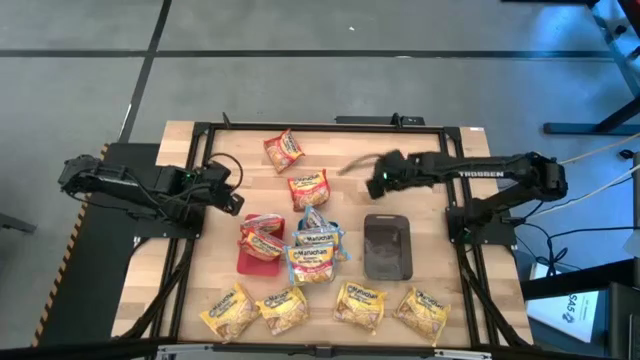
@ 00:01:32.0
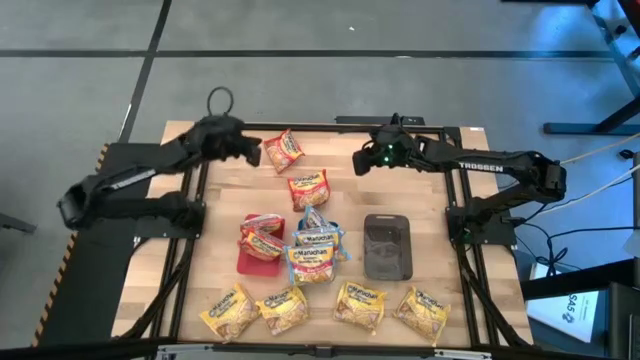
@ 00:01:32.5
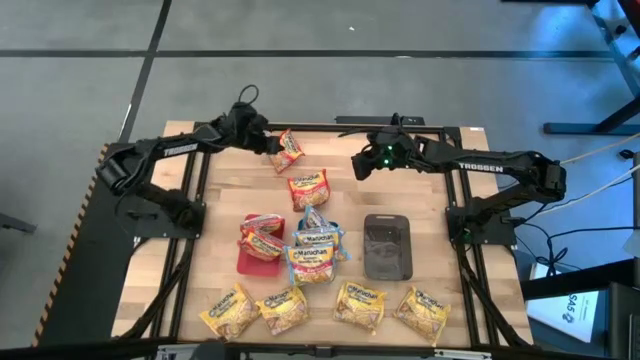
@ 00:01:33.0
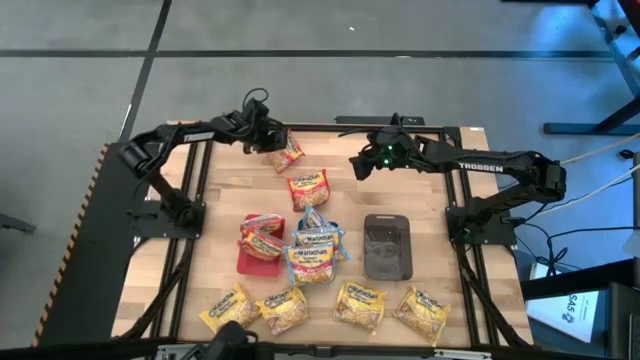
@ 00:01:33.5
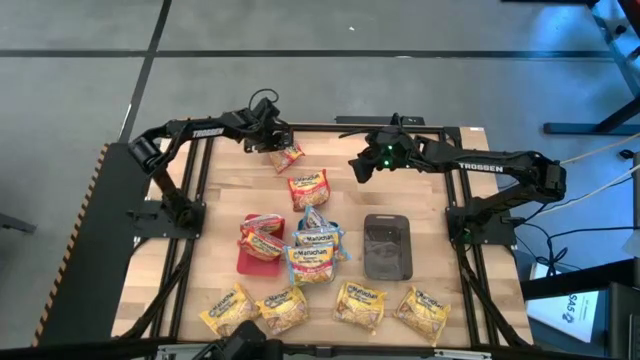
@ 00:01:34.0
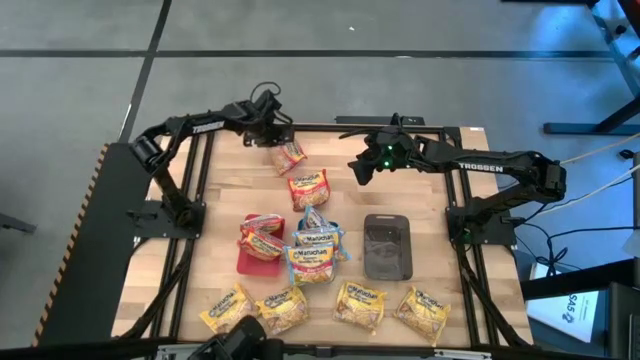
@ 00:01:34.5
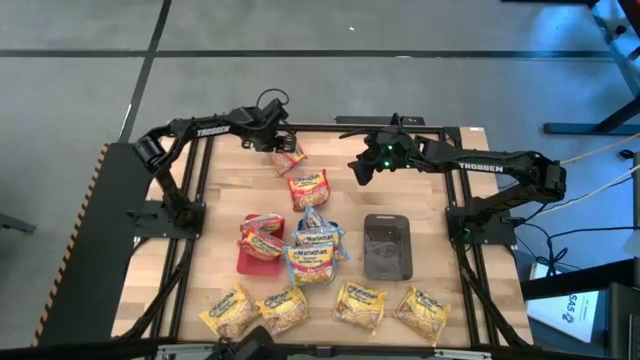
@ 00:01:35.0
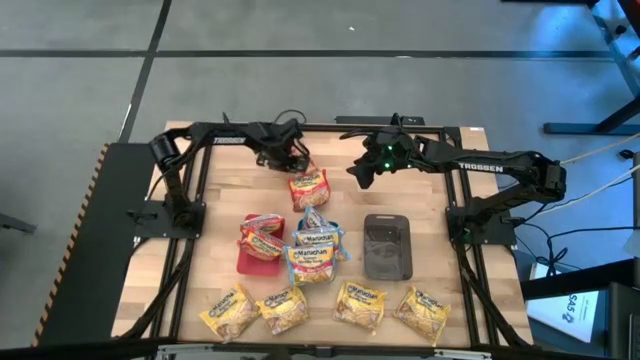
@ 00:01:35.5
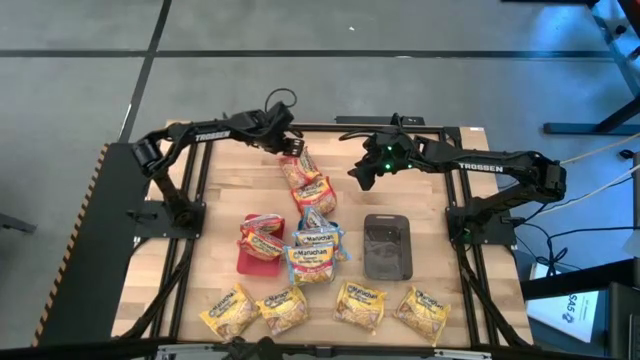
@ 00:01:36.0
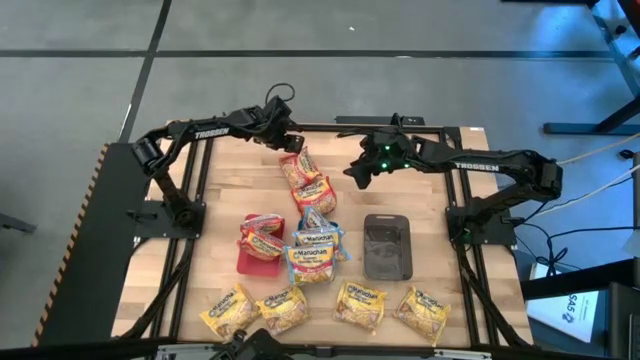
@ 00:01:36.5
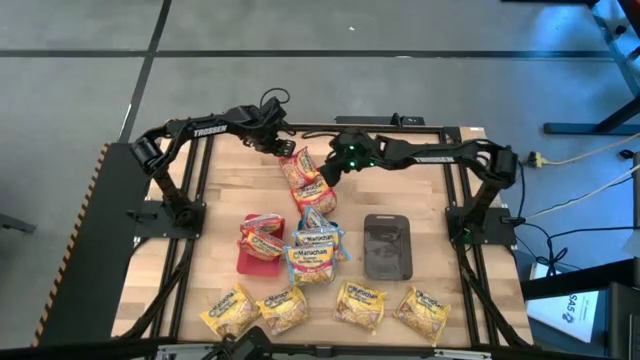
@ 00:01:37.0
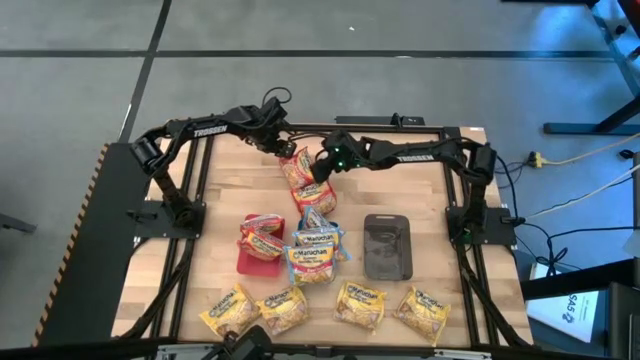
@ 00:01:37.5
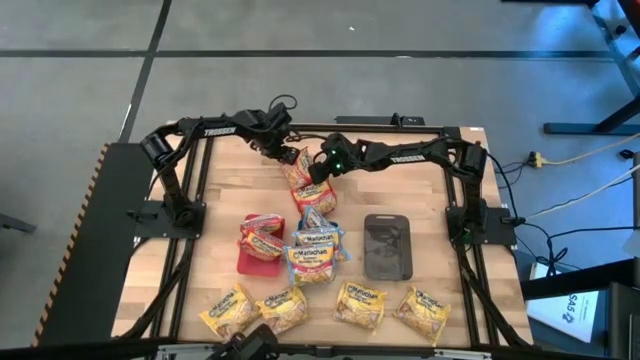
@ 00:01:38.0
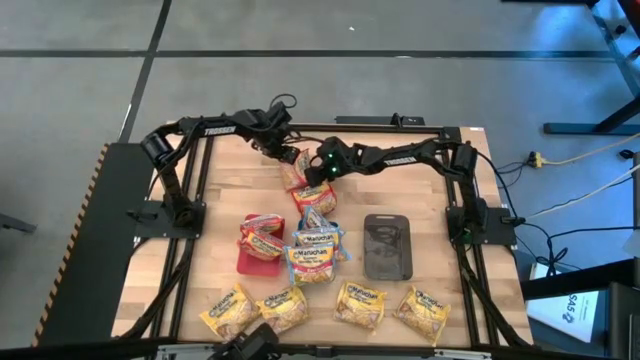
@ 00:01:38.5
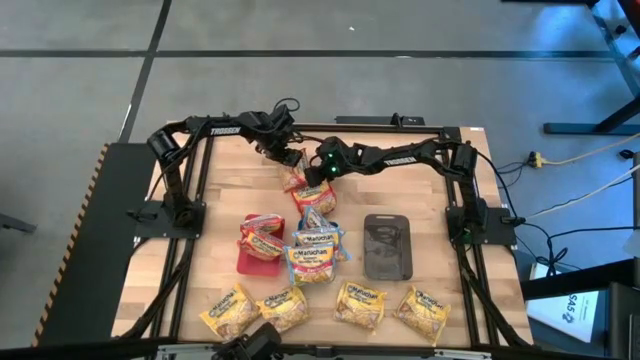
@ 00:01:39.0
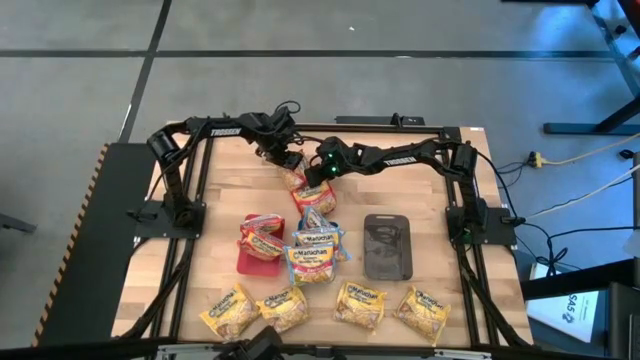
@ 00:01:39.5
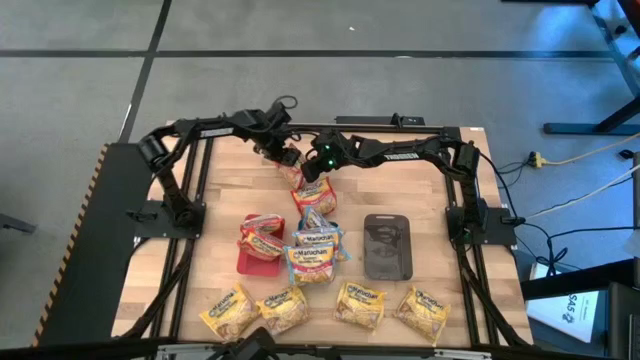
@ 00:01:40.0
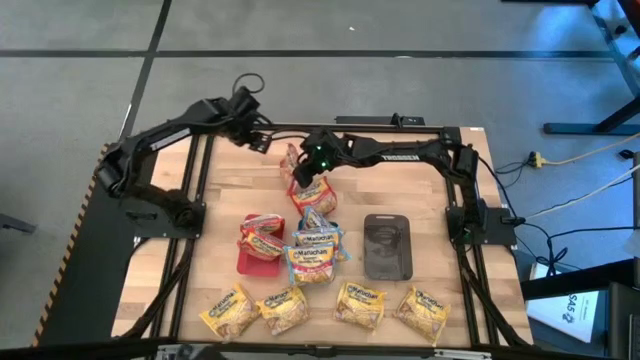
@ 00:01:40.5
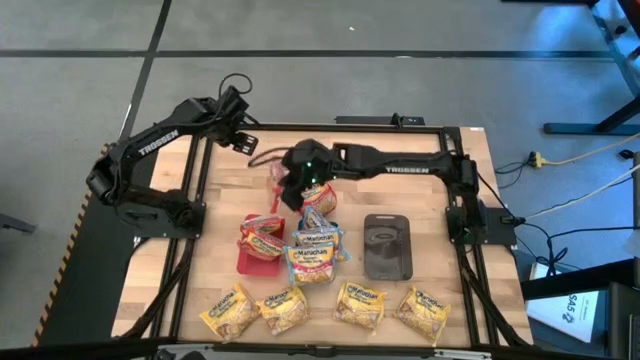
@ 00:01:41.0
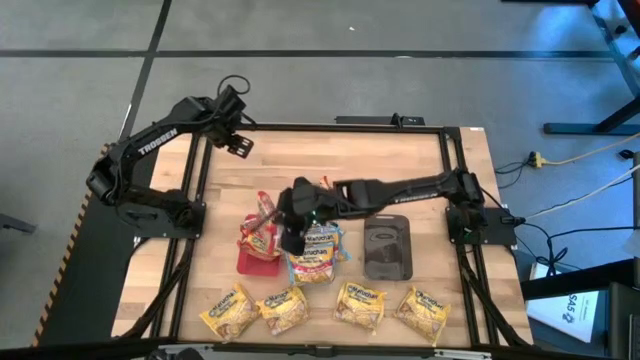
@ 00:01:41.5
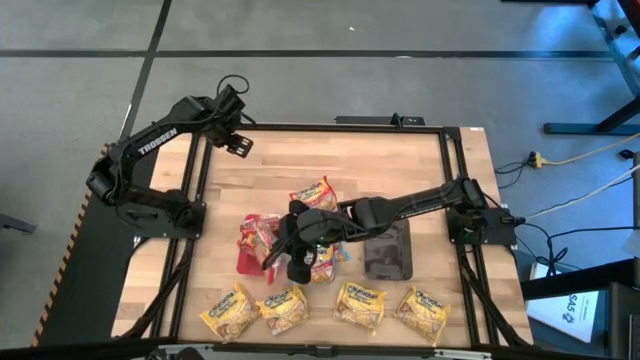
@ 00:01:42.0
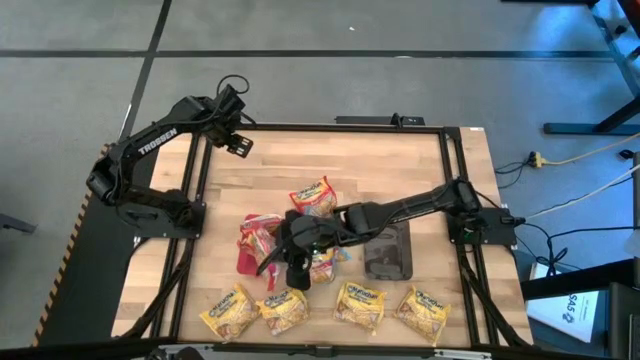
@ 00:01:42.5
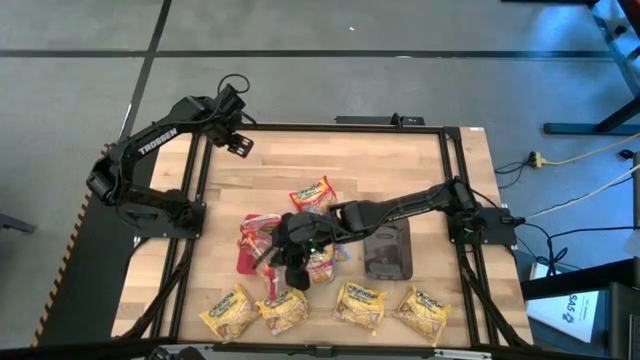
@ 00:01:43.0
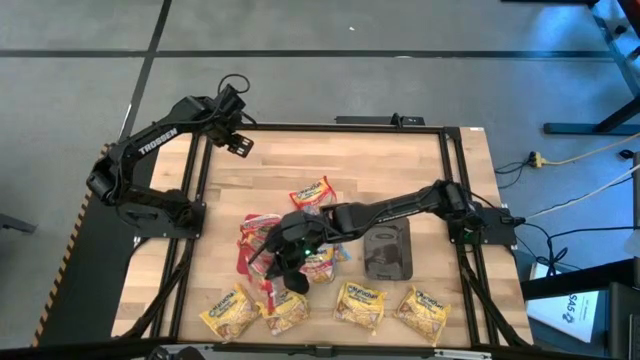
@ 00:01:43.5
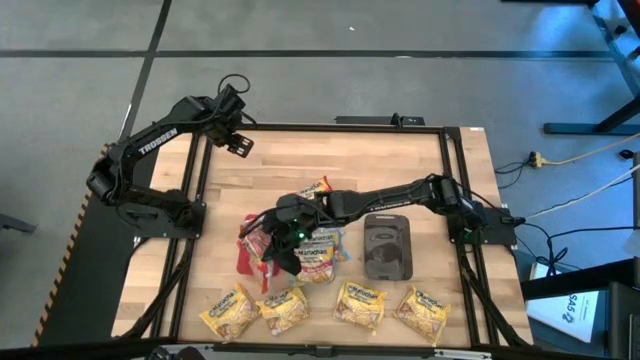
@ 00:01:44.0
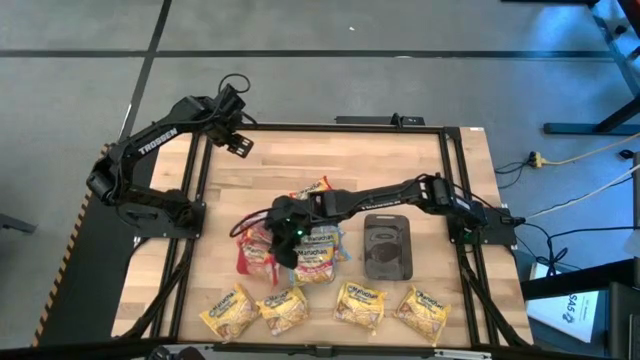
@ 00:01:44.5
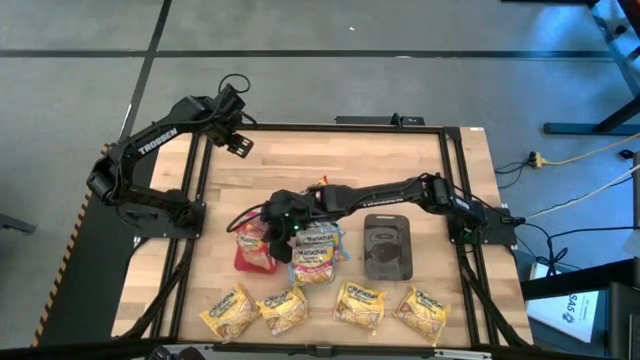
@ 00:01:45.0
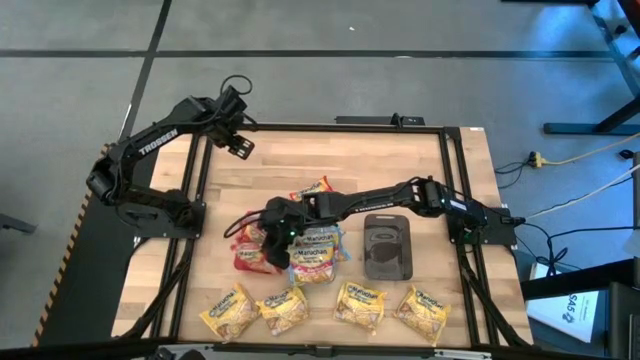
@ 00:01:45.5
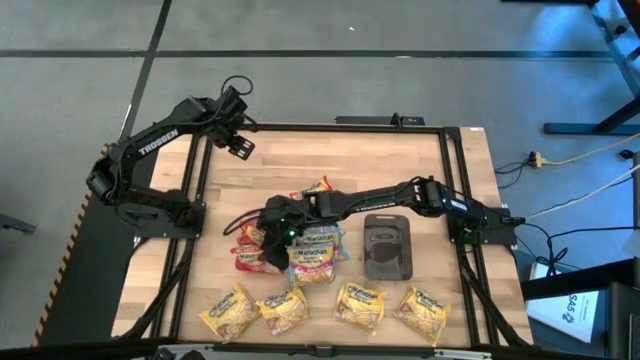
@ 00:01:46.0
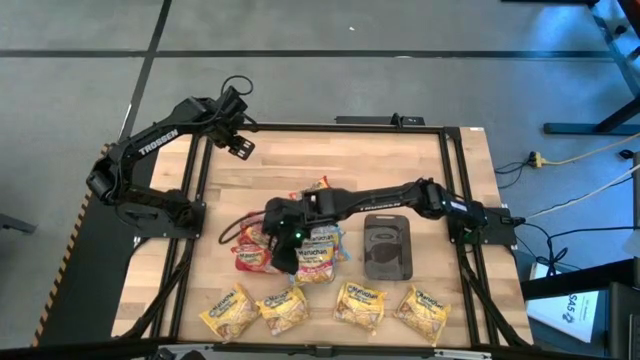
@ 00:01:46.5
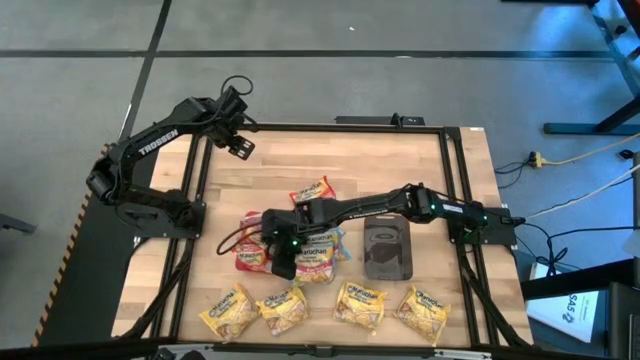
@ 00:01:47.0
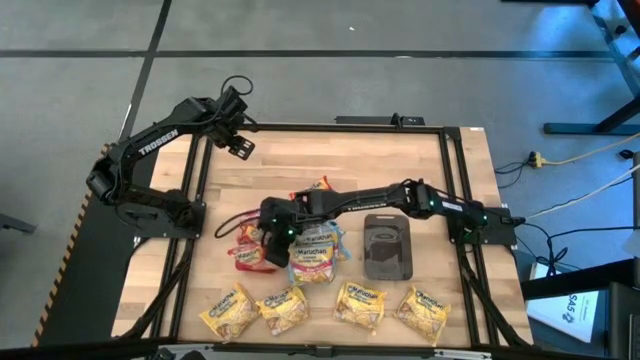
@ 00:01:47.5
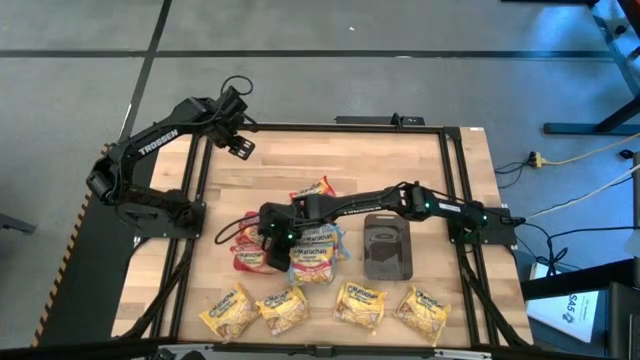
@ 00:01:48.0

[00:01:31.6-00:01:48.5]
Task: Sort Maruchan noodles
Put the red noodle pack into the red bin
